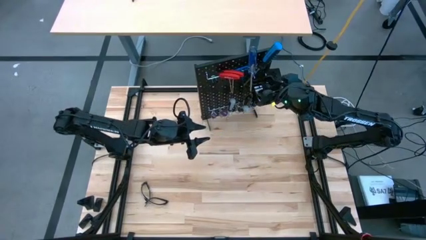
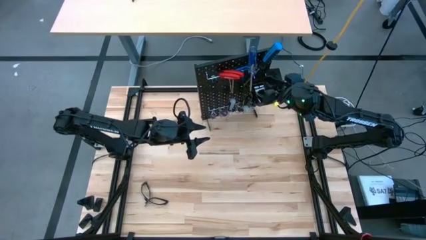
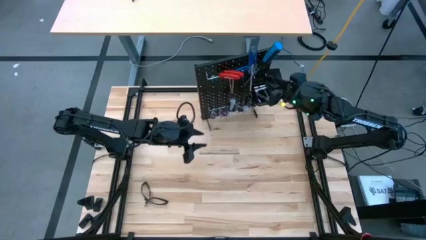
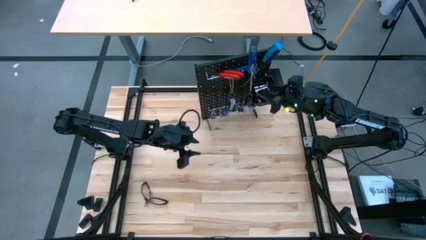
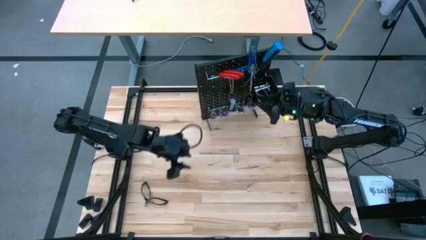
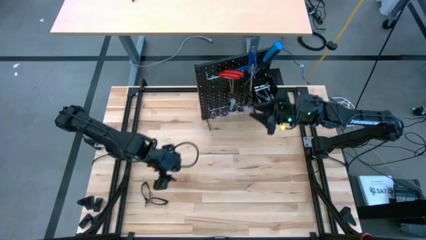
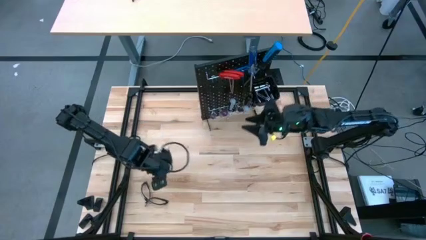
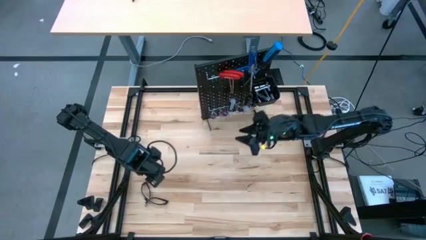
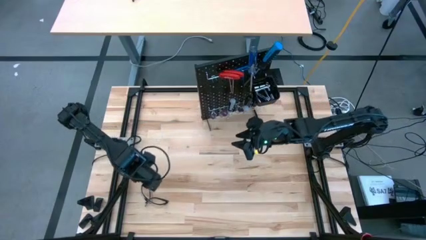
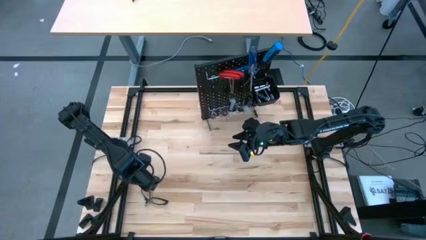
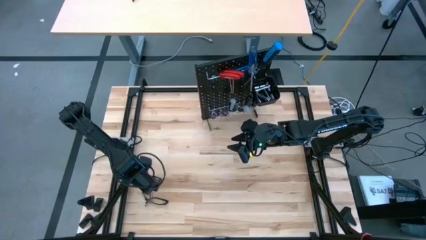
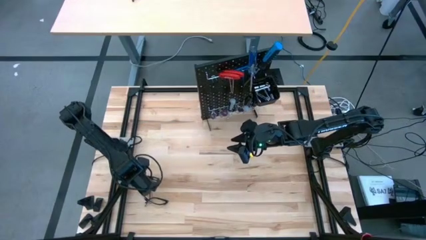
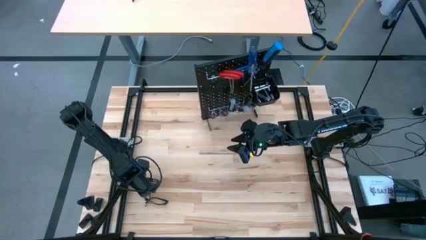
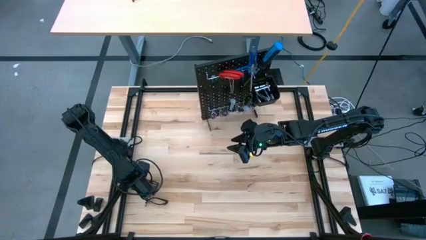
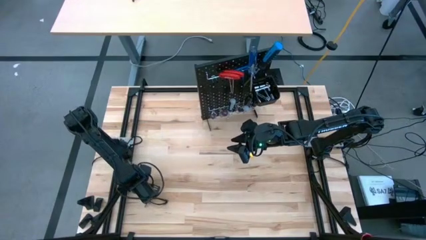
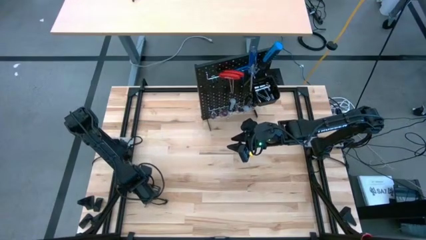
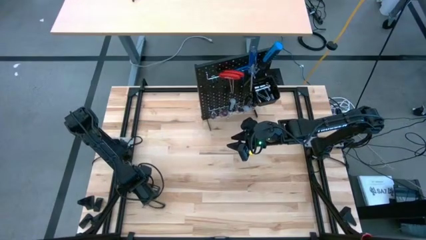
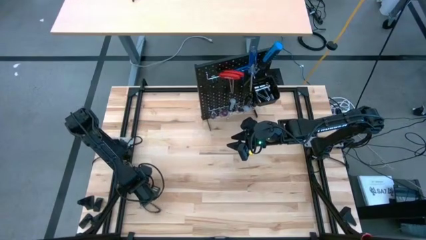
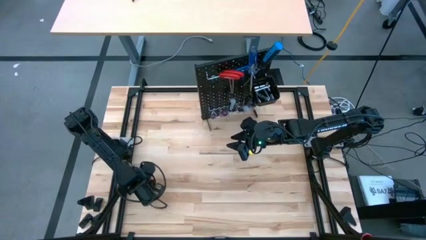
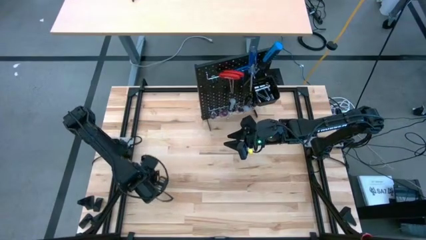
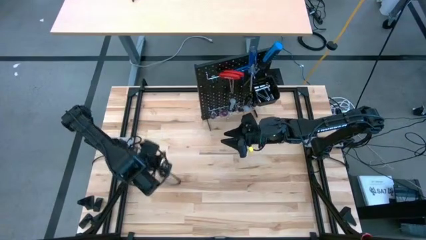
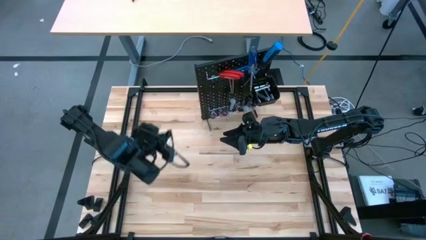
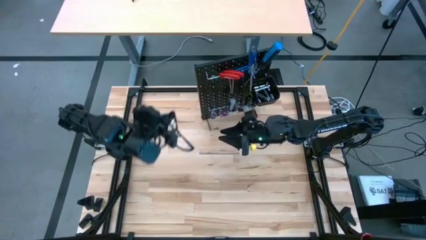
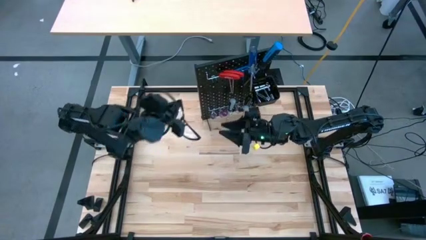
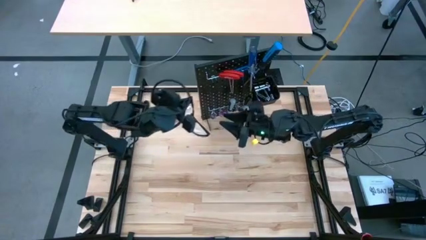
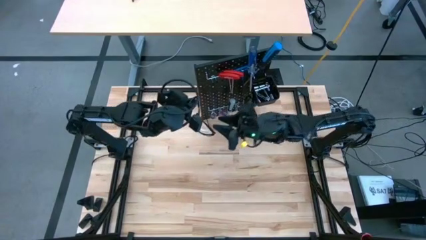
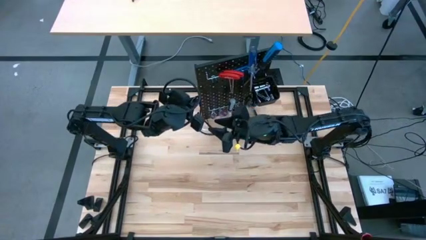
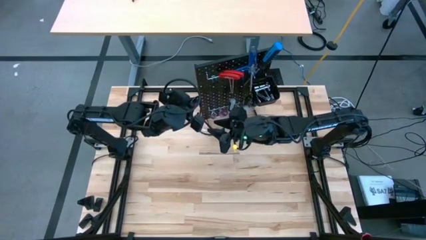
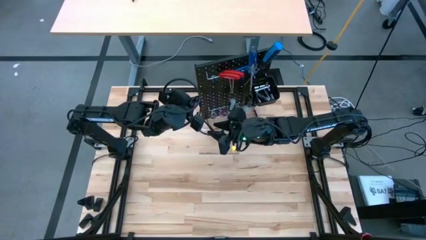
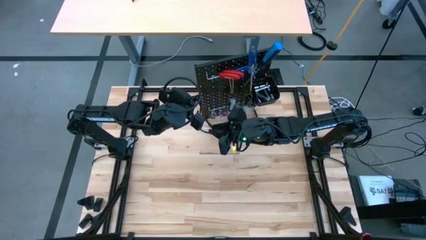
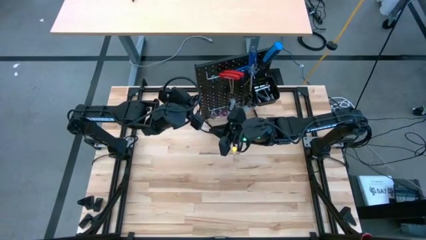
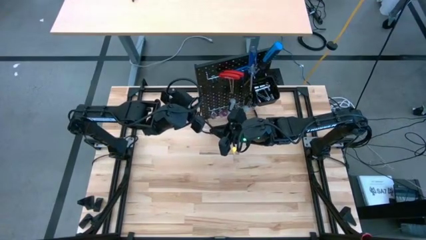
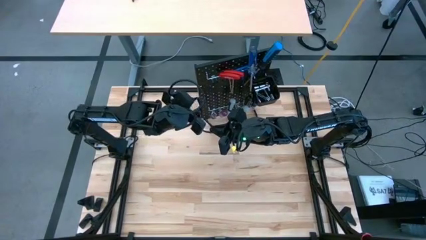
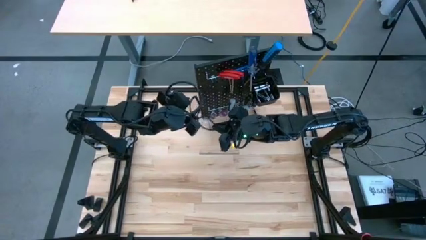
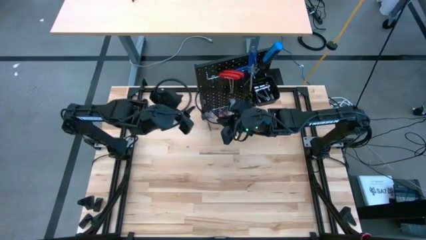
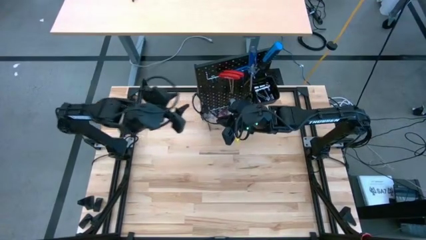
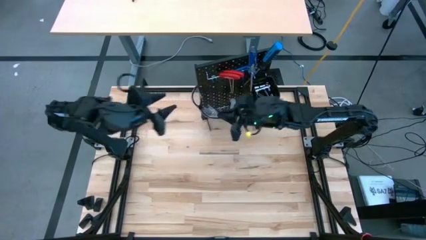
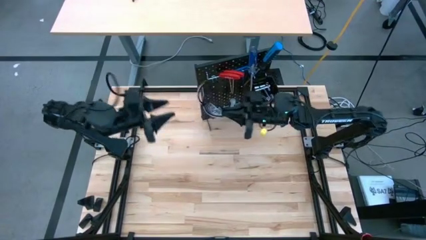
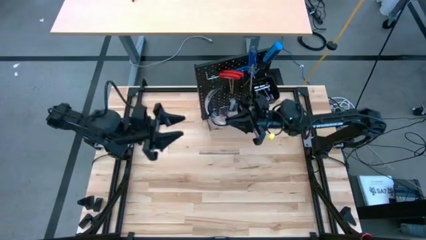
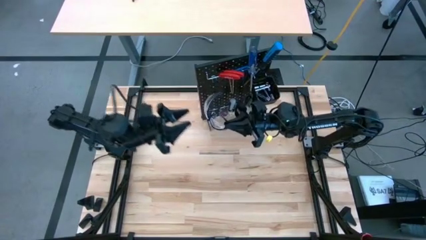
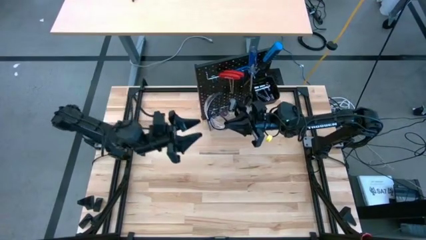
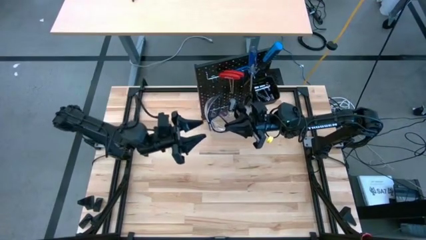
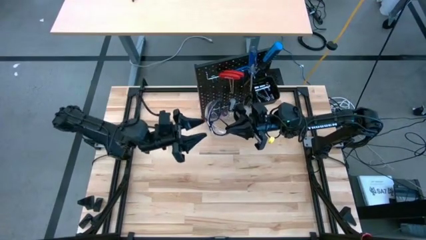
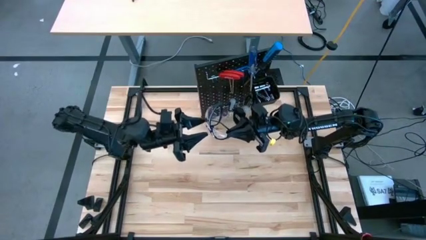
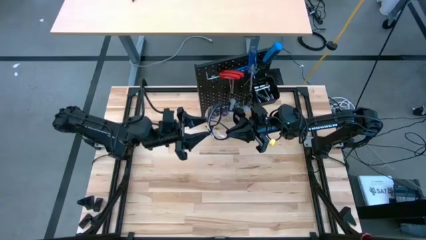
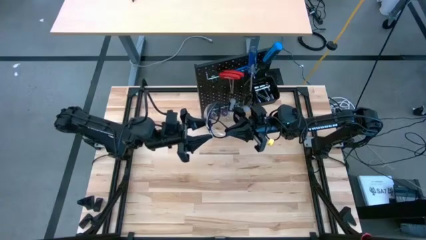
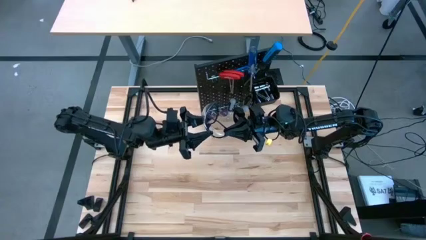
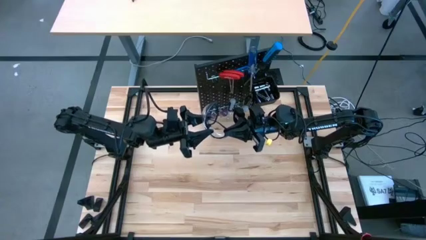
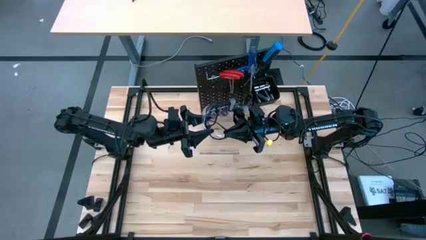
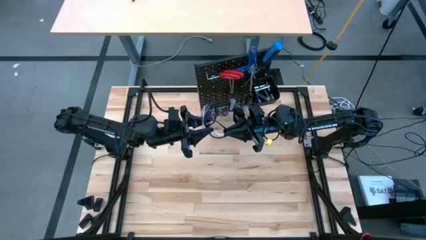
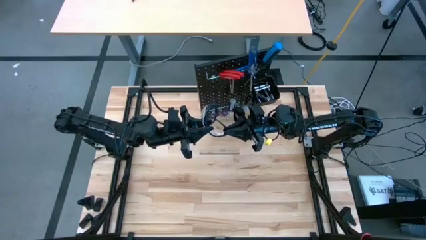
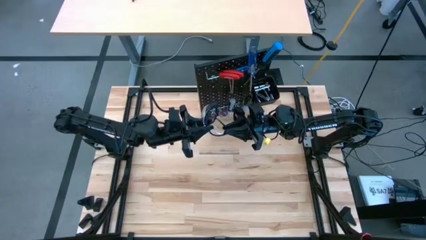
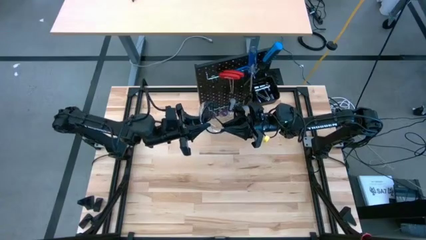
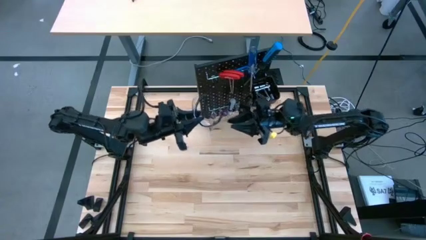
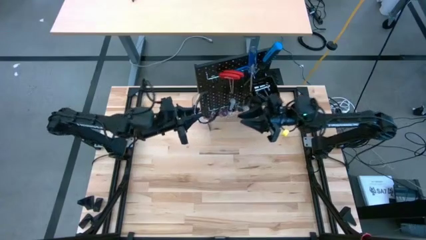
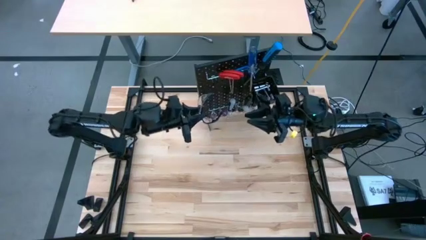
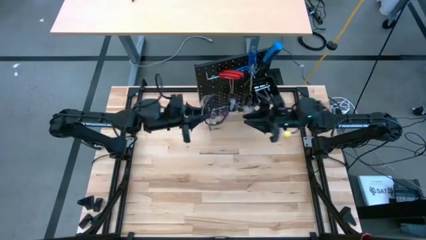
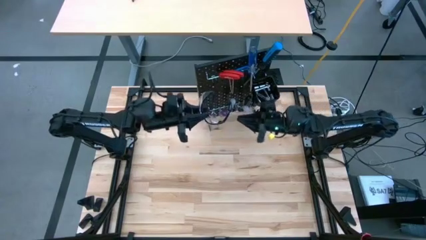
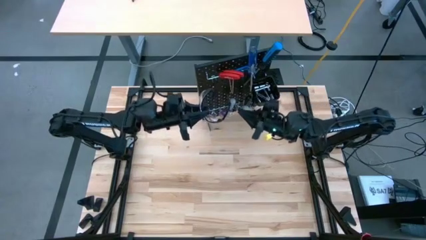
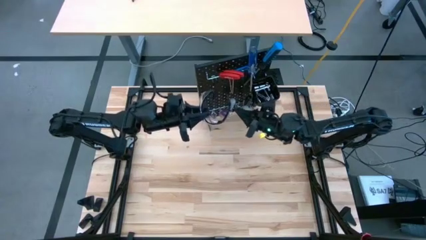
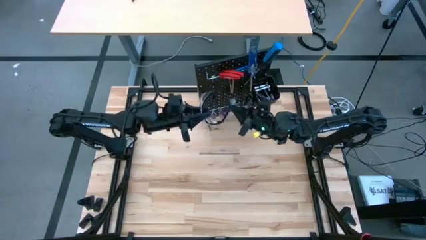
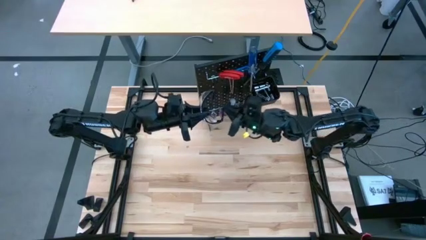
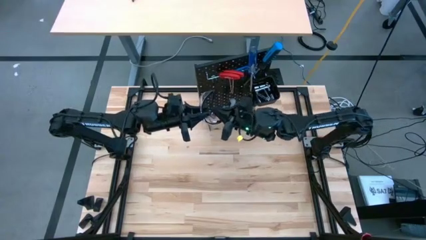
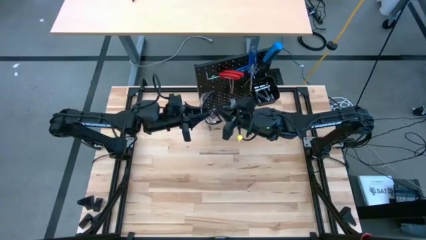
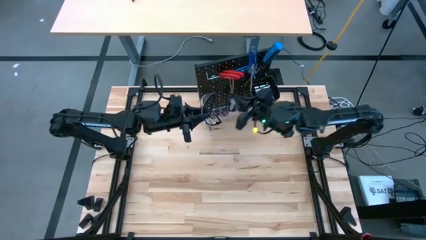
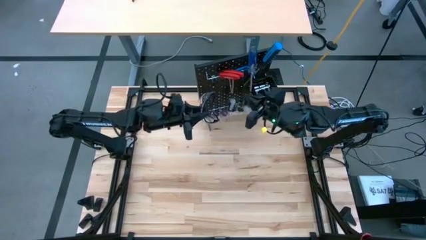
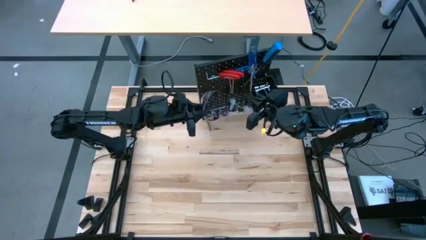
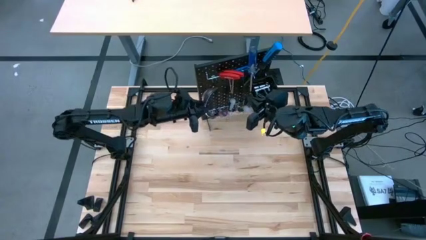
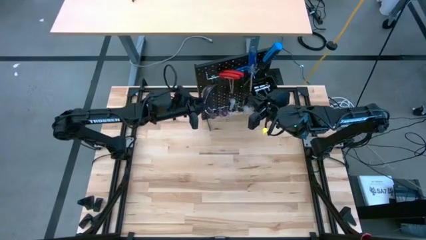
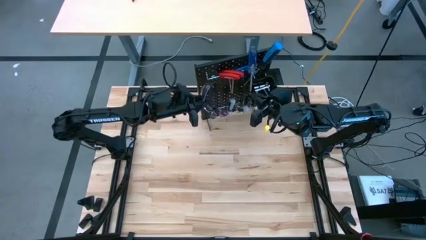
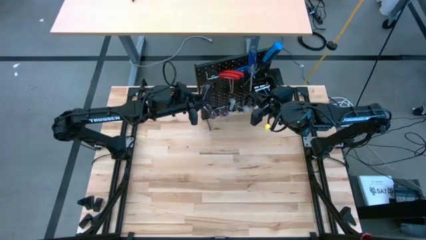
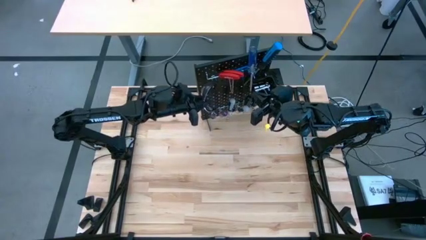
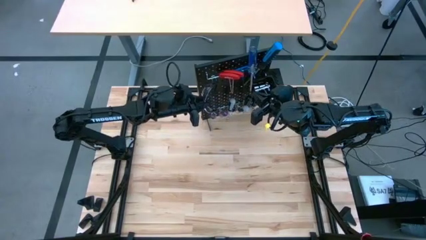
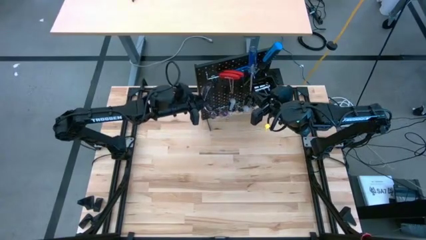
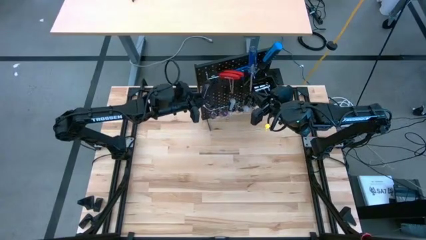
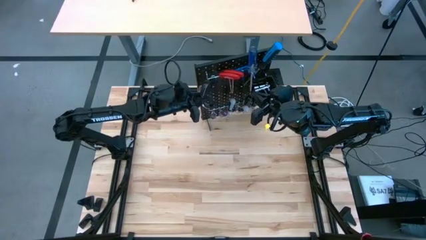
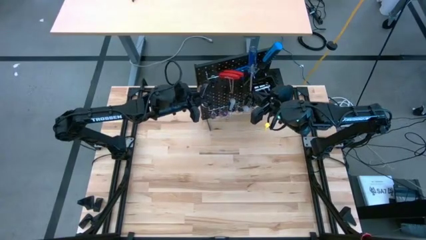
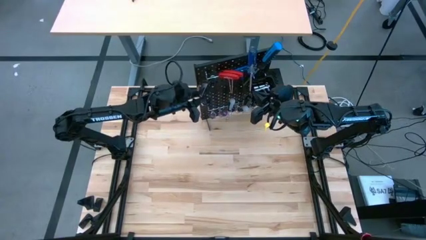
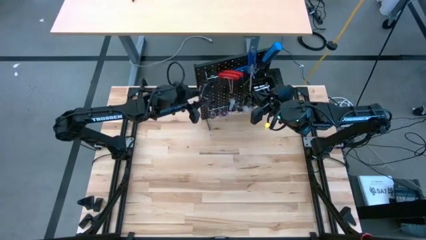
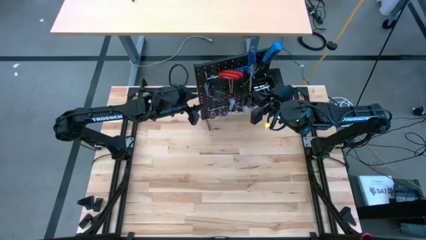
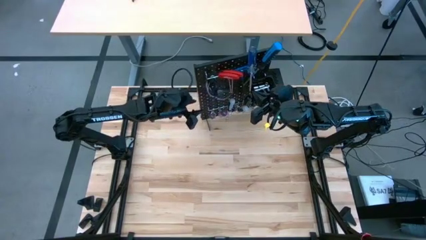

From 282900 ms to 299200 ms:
Task: Hang tools onto peg board
Hang the black safety goggles on the pegboard

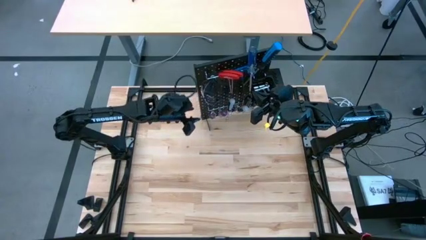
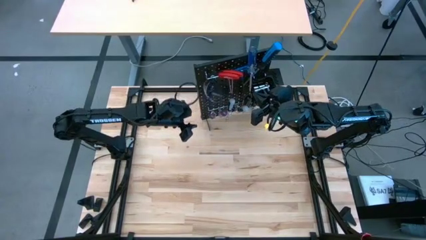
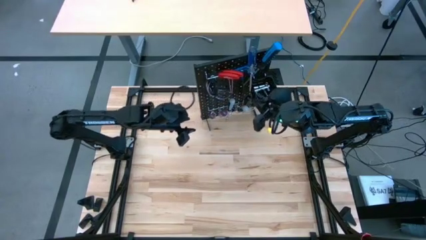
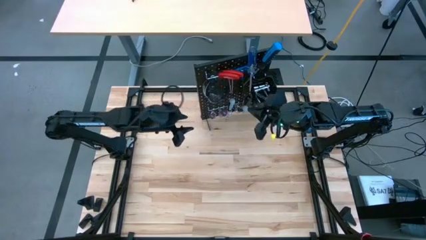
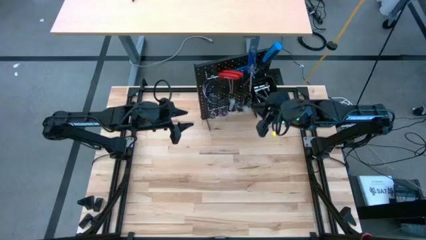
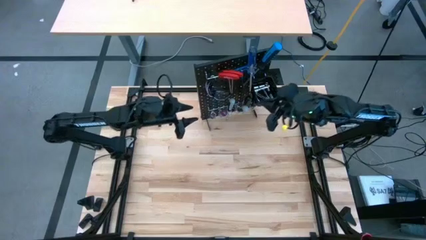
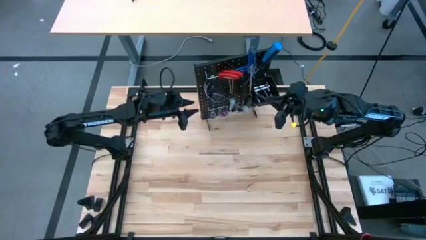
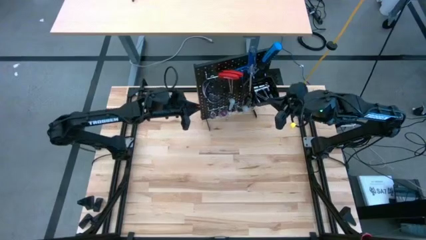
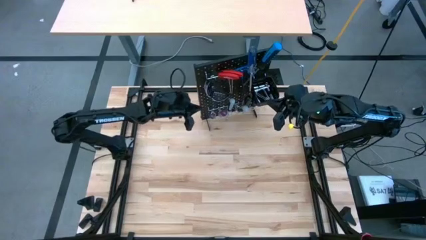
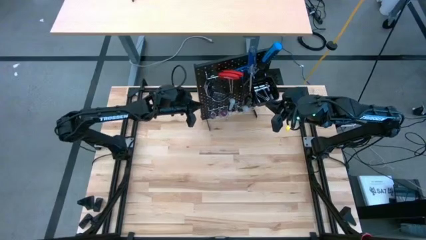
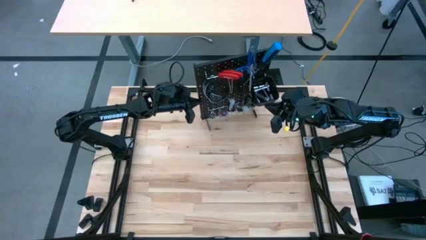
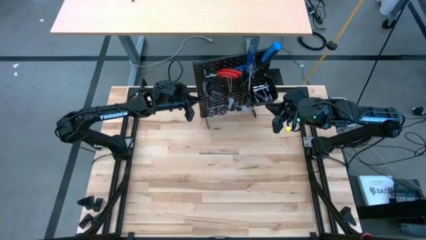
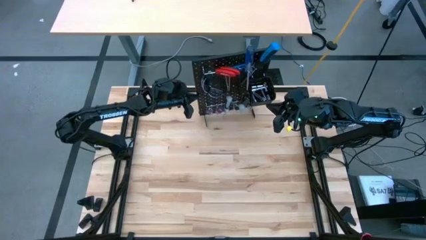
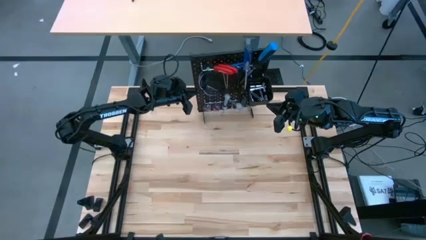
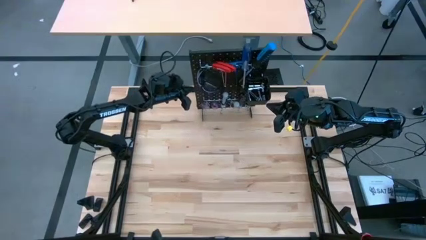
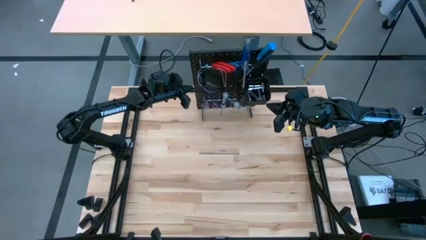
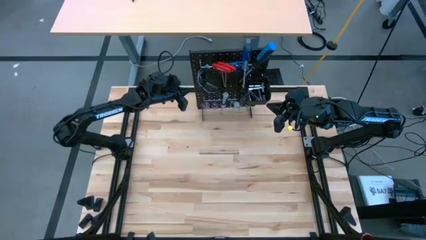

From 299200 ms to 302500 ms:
Adjust the pegboard on the table
